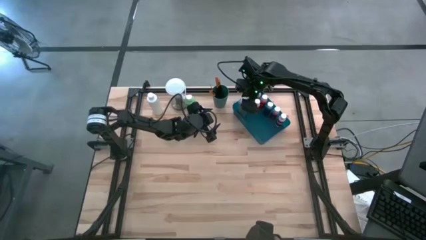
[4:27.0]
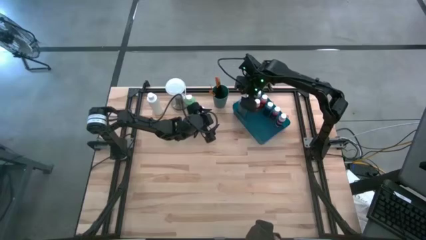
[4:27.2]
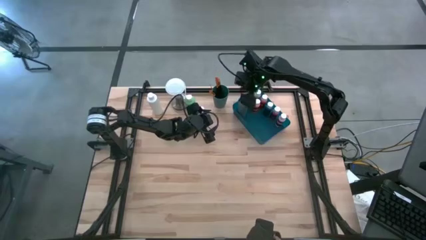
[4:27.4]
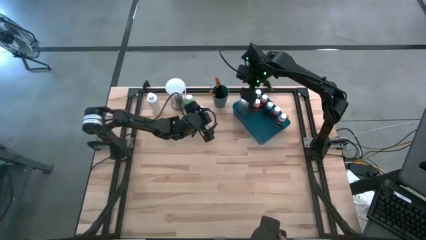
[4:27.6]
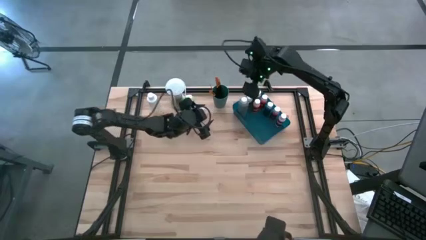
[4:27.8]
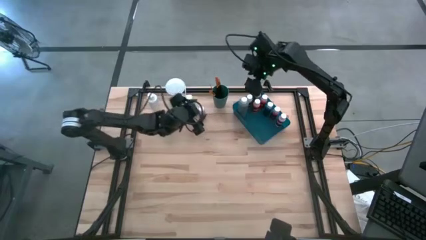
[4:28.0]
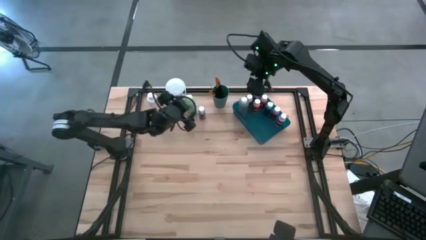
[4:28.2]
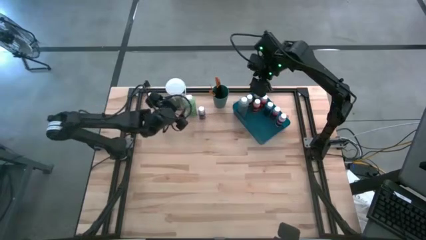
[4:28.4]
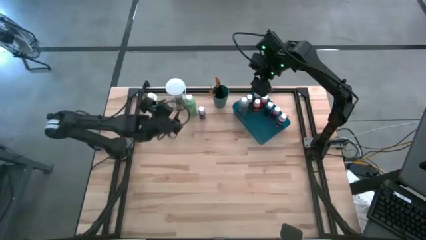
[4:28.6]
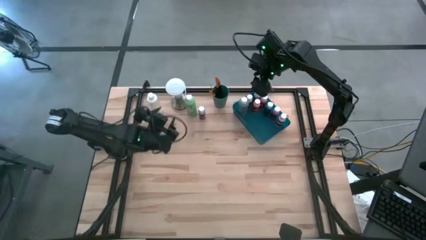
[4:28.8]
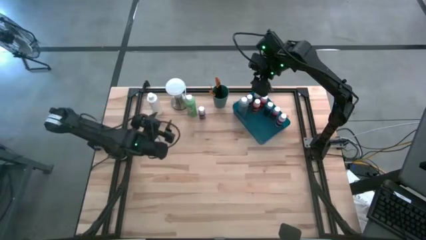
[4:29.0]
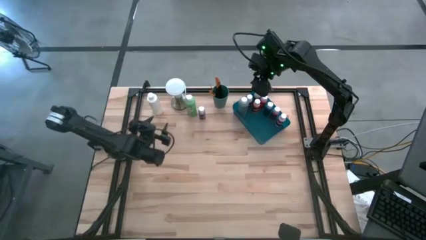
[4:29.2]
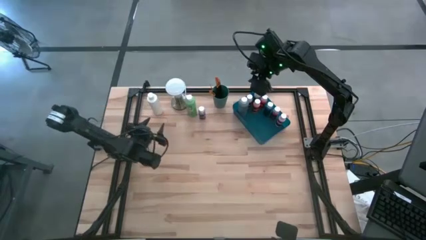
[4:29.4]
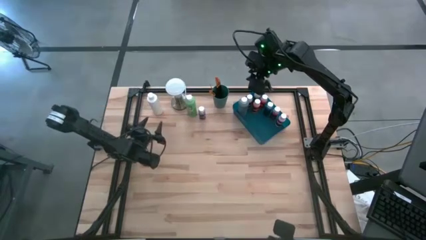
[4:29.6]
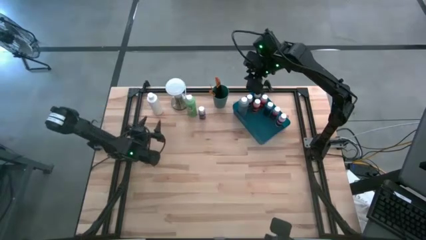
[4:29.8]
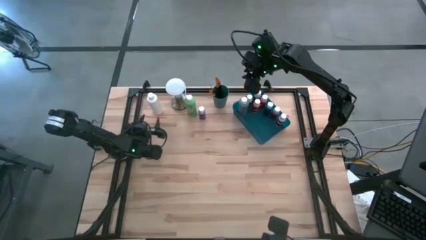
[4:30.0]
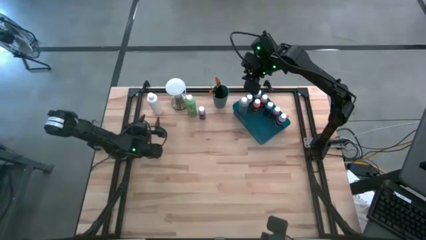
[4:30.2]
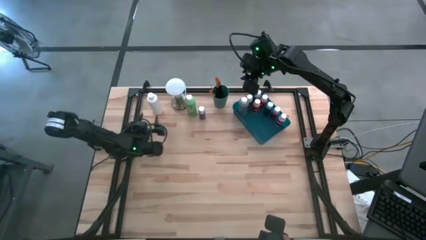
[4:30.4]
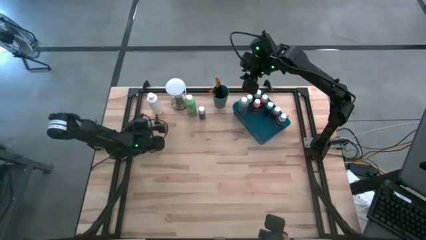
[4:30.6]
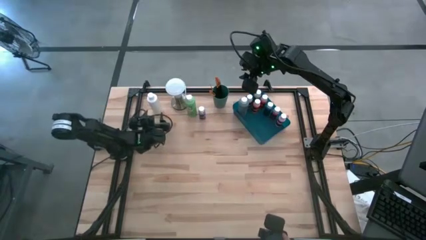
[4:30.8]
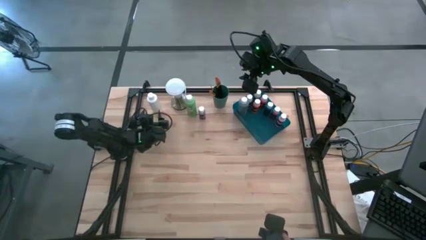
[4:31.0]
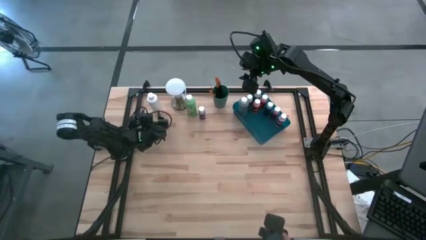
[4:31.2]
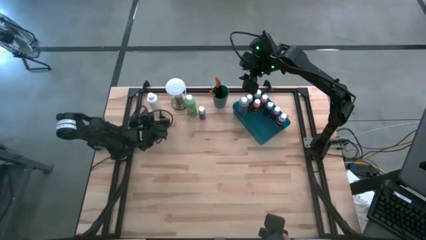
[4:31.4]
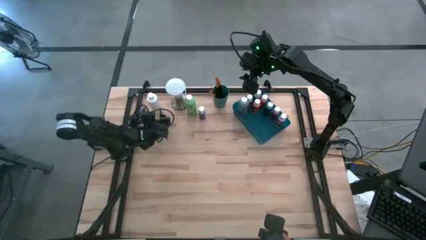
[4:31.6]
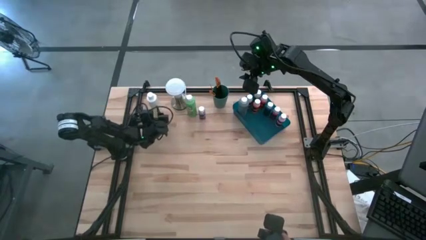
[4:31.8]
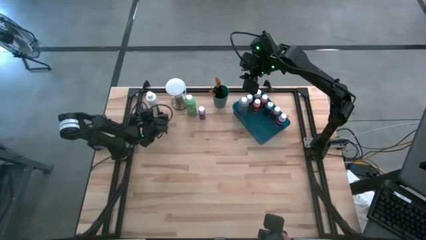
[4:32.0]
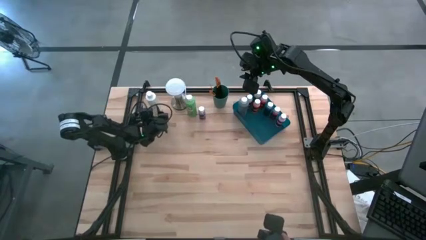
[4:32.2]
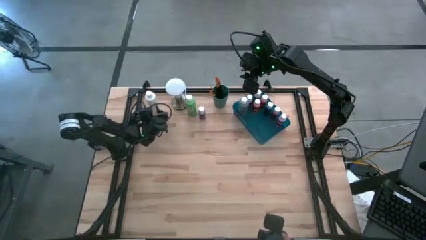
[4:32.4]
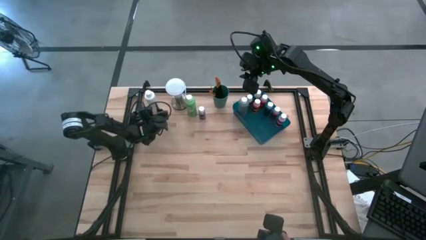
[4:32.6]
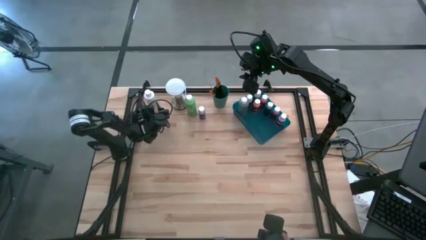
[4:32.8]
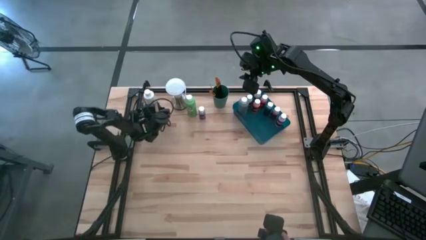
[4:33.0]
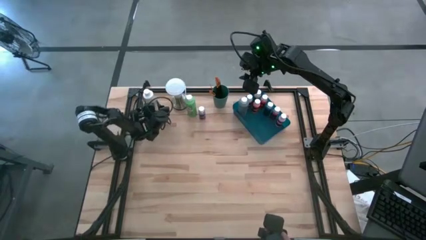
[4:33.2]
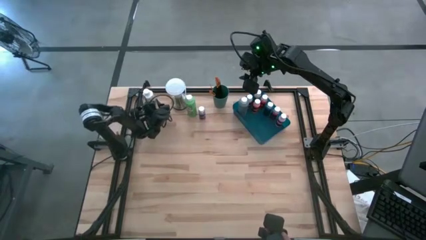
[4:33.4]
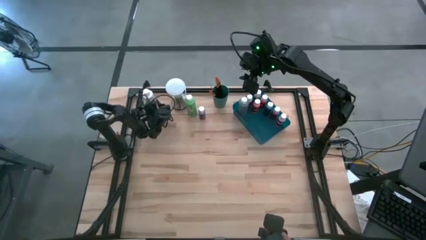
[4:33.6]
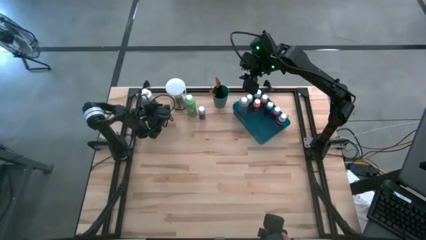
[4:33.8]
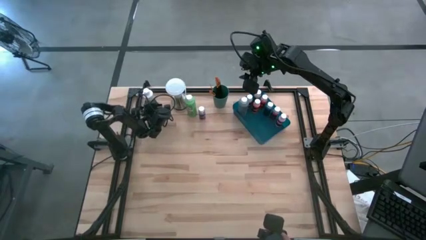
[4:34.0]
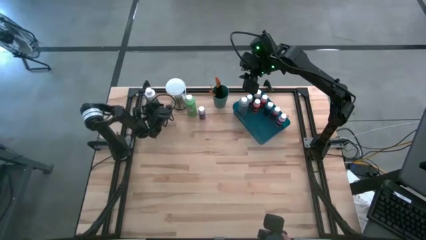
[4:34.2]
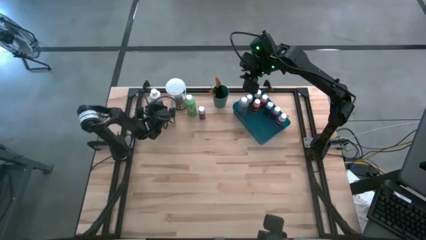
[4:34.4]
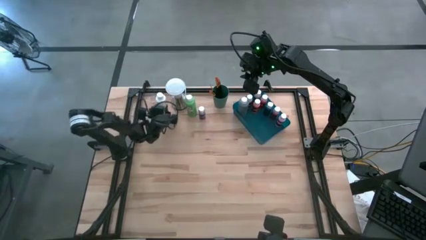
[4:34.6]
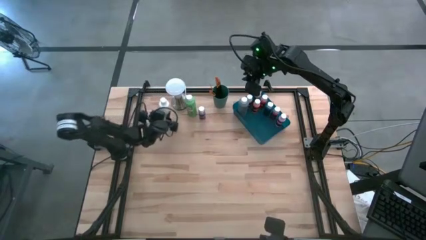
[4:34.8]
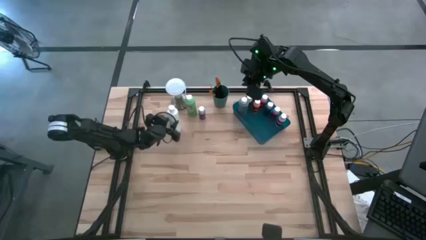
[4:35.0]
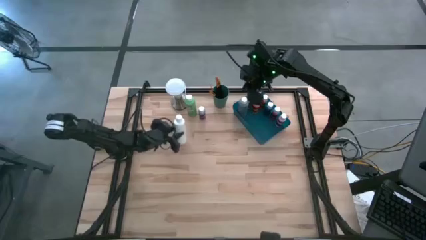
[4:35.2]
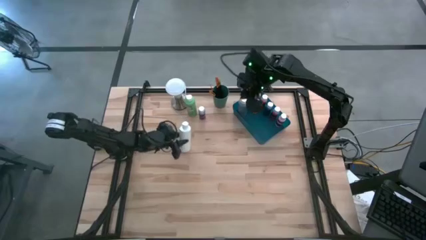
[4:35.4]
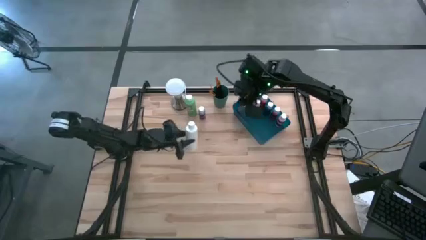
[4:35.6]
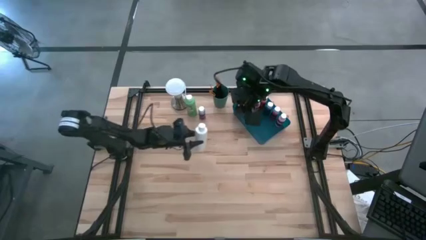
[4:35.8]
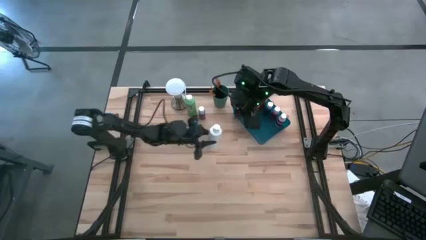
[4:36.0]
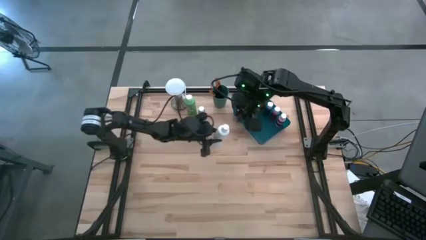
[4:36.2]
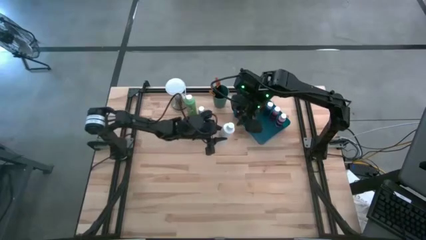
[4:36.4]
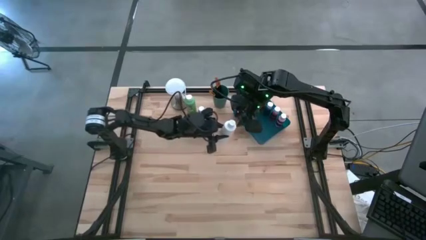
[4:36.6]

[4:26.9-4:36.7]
Task: Pick & Place Paint Supplies
Put the white paint bottle into the blue bin

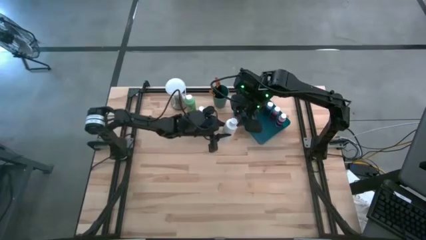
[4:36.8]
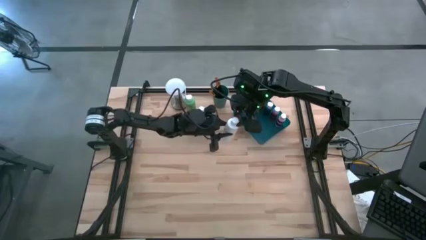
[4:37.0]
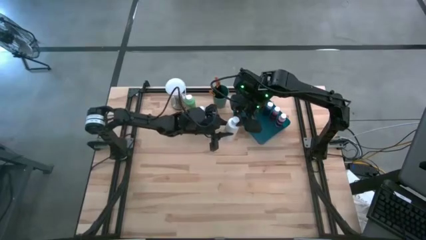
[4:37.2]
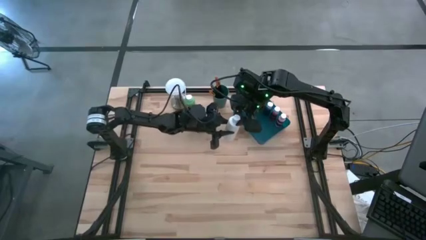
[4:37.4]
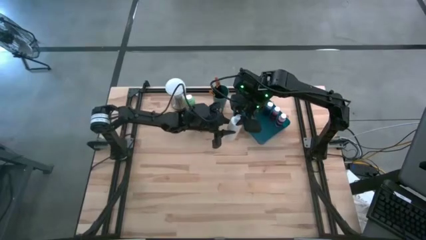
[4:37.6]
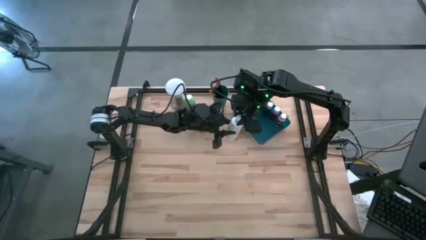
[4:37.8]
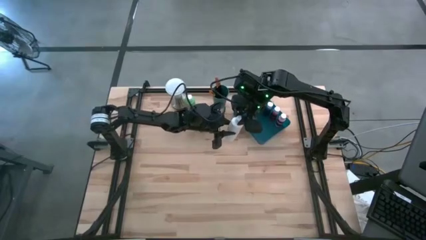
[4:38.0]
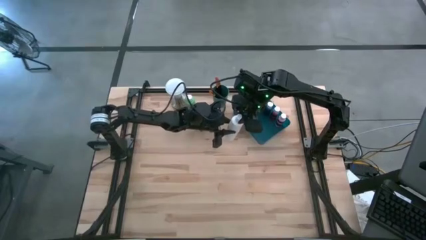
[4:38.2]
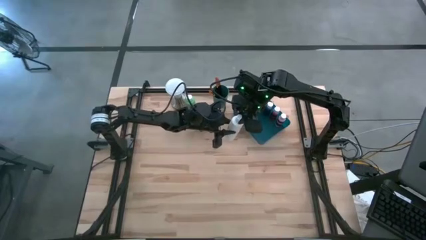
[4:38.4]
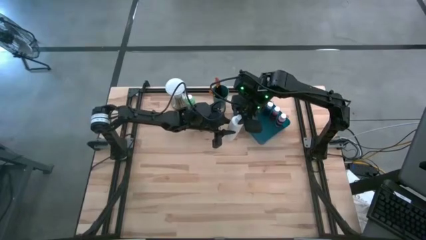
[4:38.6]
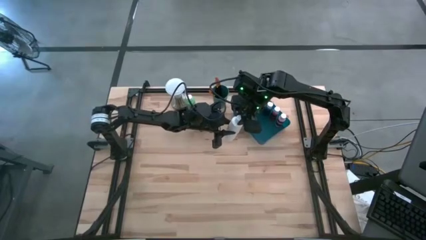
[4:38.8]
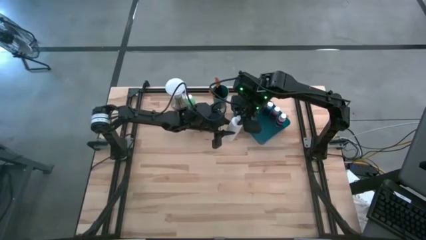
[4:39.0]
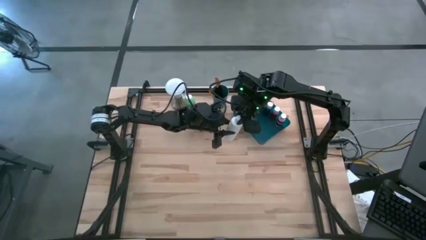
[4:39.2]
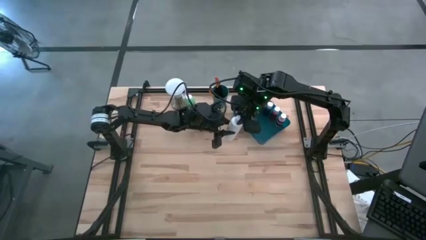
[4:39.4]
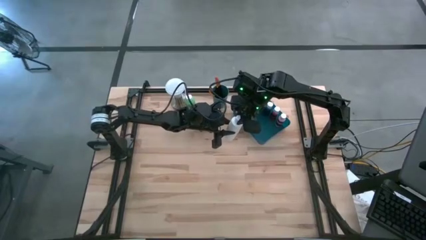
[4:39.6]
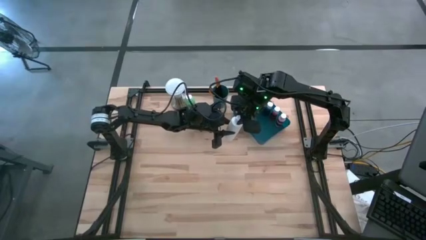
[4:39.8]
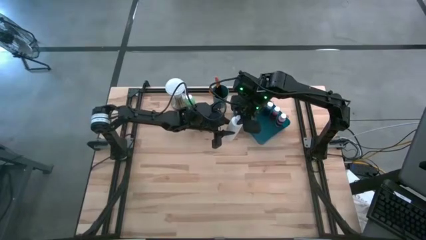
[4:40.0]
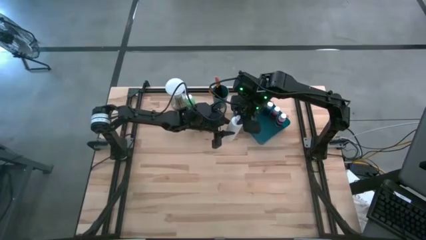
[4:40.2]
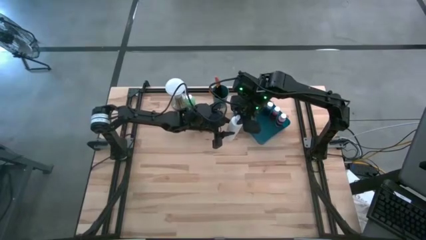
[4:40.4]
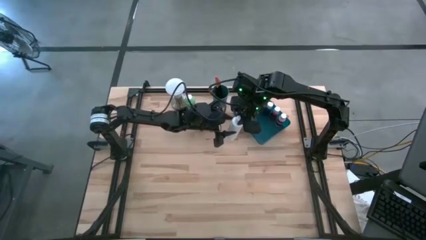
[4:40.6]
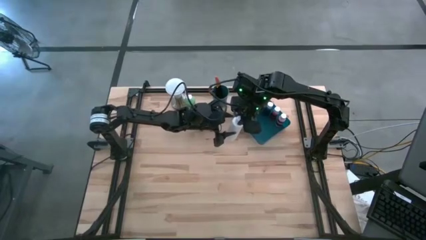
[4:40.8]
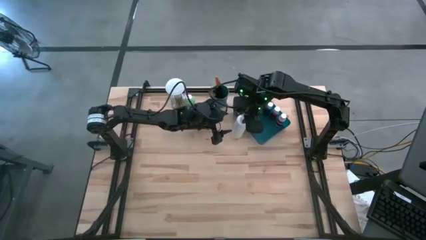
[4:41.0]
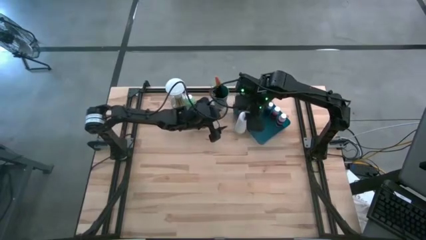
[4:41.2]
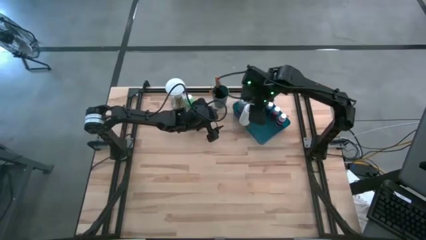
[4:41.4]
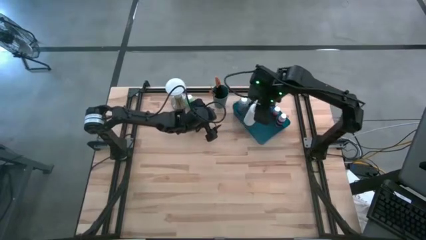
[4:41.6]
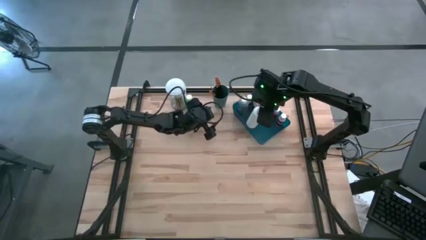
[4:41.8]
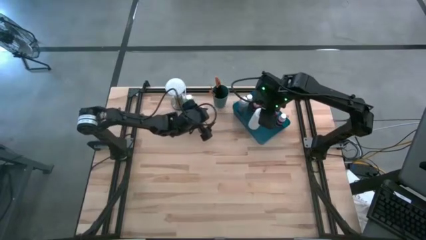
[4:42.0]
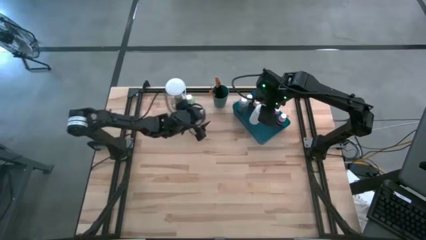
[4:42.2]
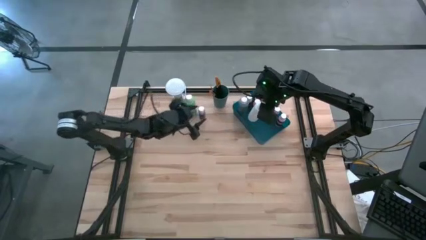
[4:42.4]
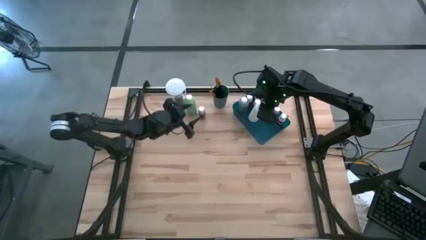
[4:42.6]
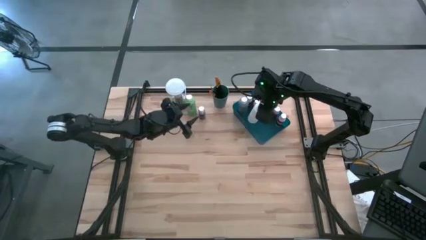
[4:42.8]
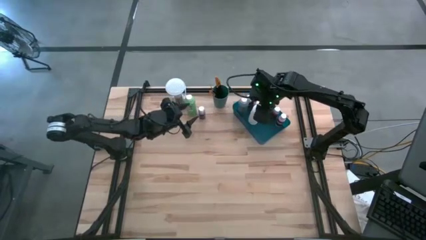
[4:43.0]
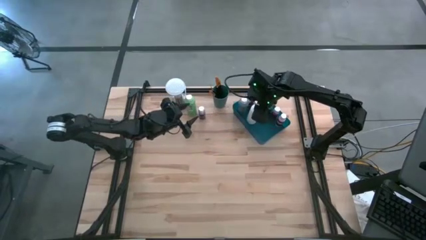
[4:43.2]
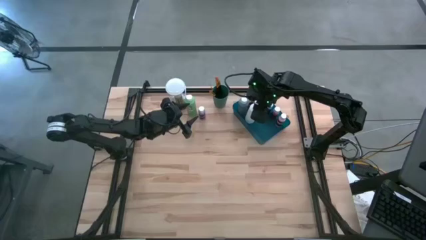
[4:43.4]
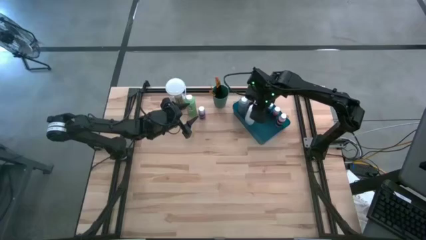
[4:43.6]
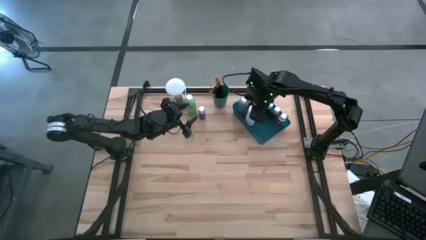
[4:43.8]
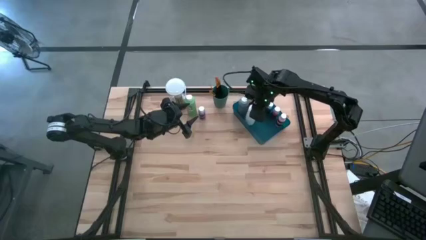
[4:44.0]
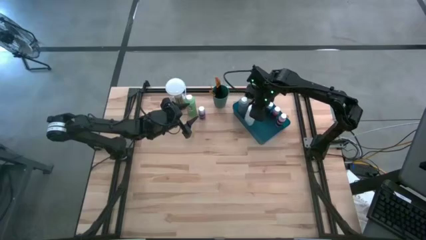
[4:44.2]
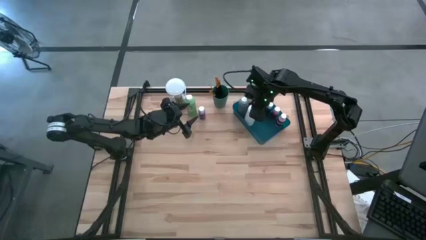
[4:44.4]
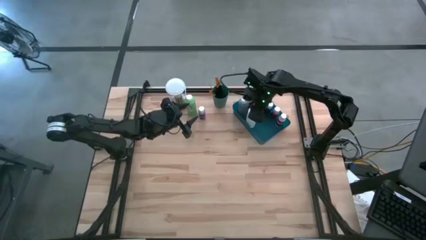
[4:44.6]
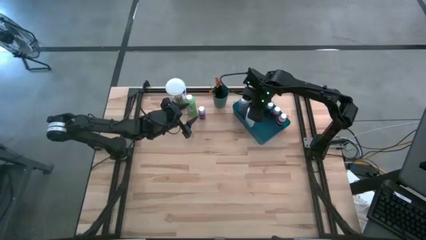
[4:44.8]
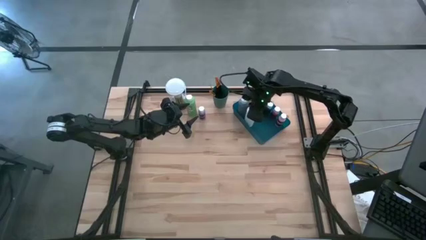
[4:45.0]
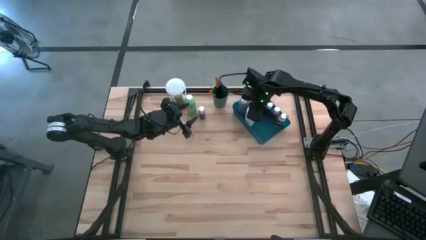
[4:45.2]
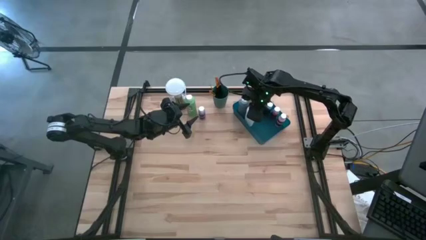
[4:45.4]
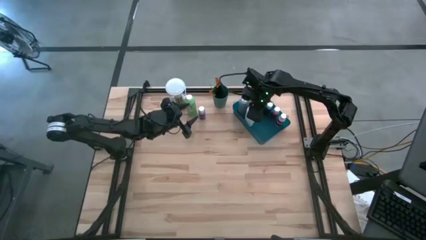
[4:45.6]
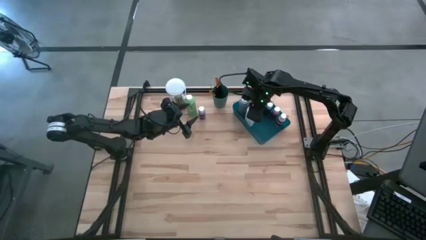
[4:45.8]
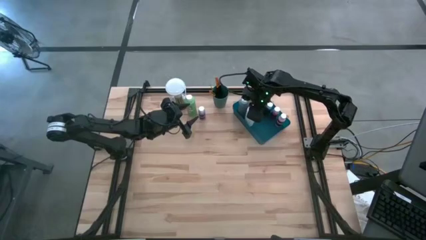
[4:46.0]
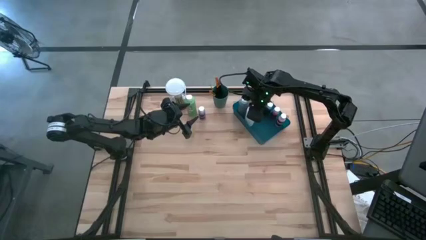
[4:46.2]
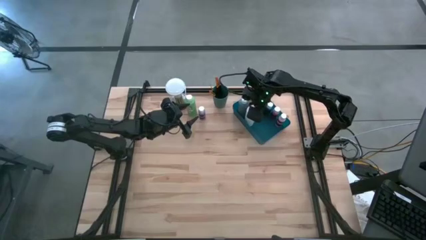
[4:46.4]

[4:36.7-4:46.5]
Put the white paint bottle into the blue bin
